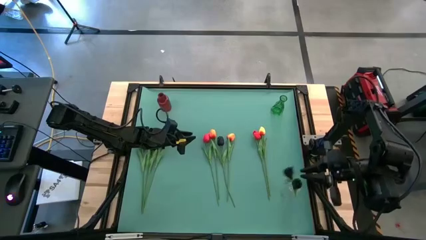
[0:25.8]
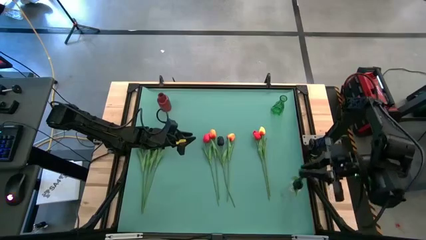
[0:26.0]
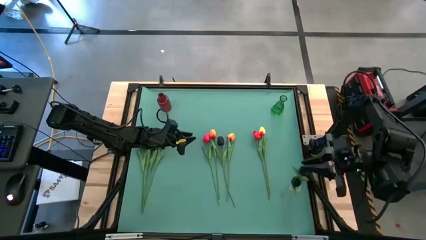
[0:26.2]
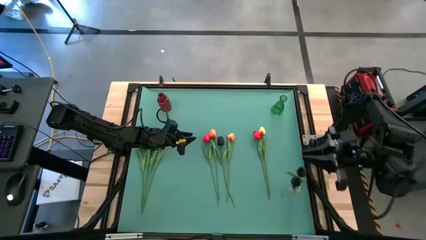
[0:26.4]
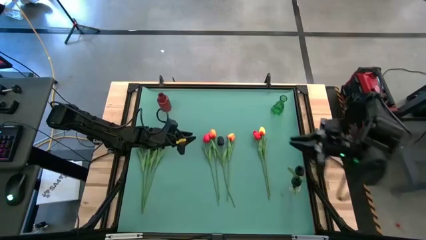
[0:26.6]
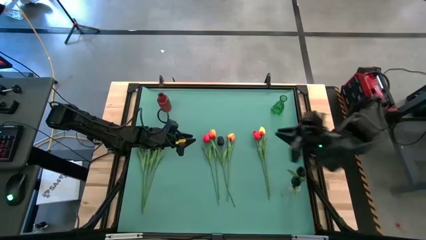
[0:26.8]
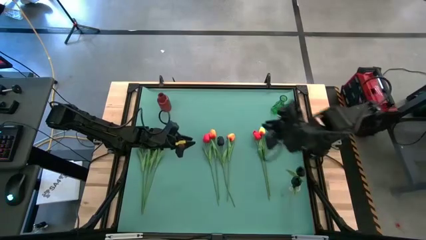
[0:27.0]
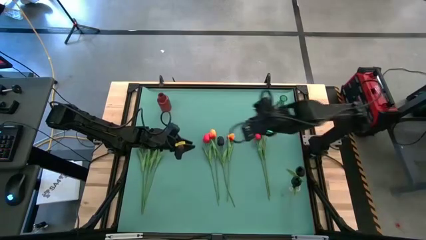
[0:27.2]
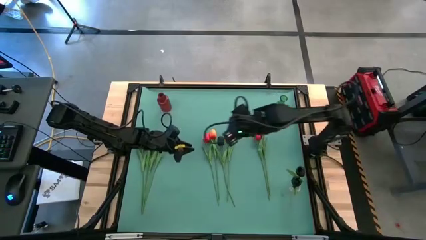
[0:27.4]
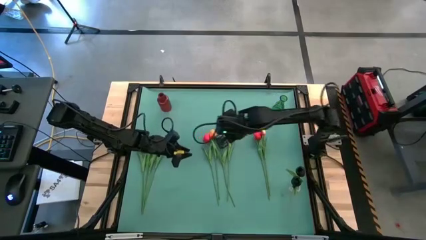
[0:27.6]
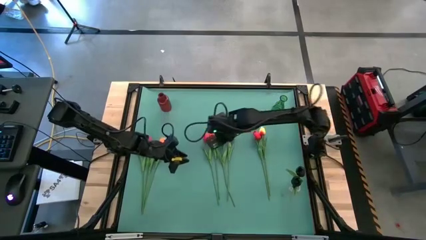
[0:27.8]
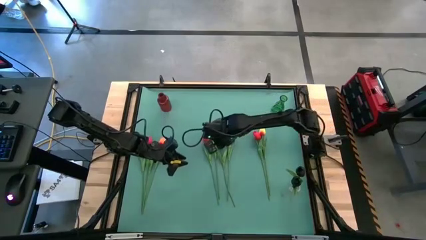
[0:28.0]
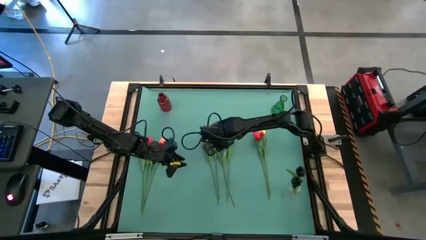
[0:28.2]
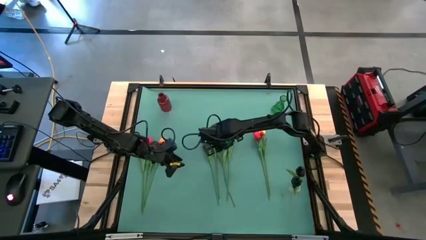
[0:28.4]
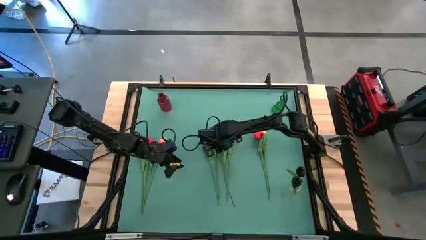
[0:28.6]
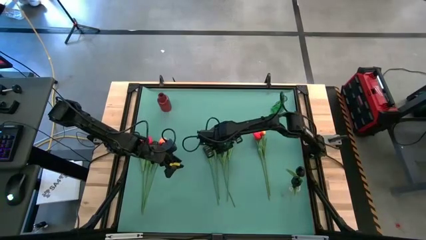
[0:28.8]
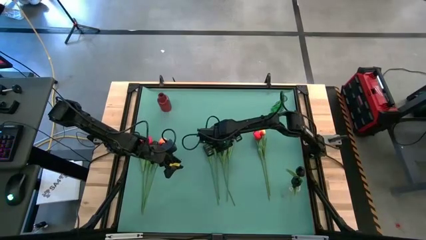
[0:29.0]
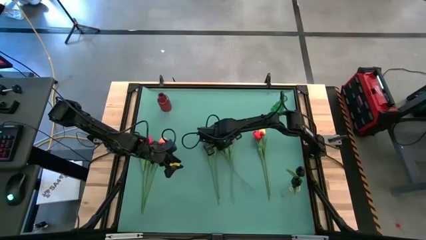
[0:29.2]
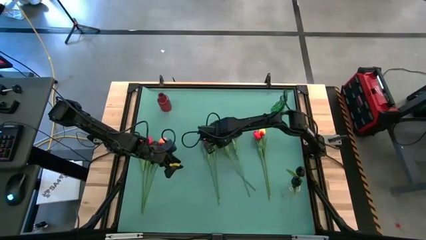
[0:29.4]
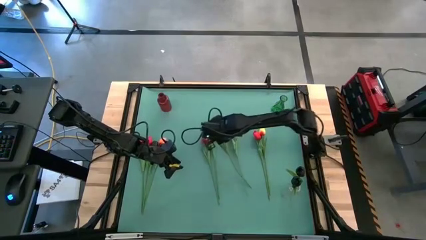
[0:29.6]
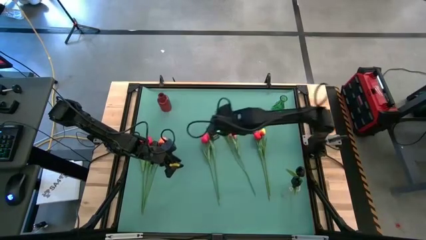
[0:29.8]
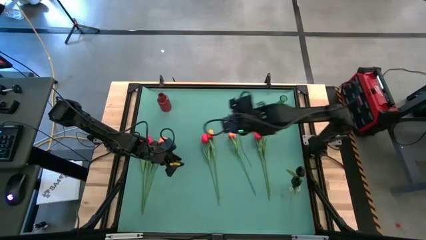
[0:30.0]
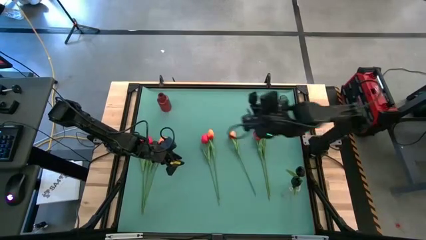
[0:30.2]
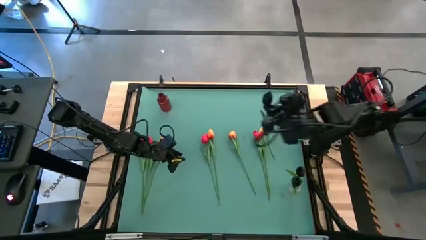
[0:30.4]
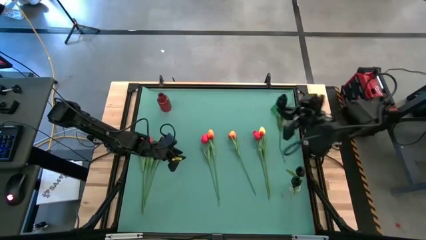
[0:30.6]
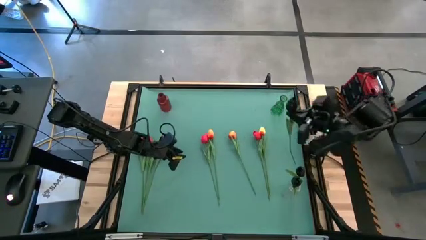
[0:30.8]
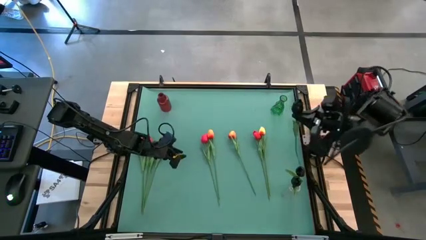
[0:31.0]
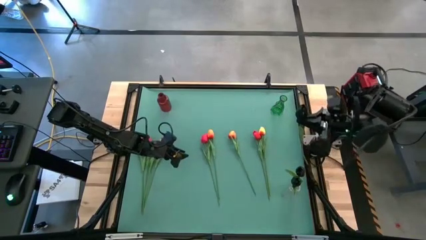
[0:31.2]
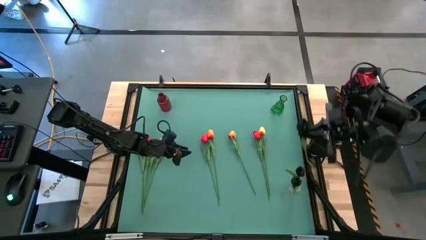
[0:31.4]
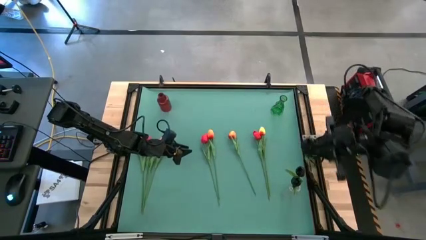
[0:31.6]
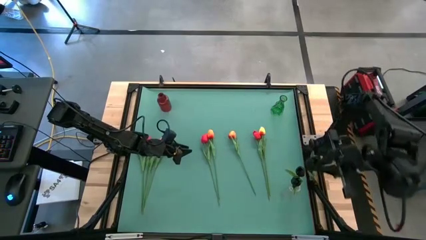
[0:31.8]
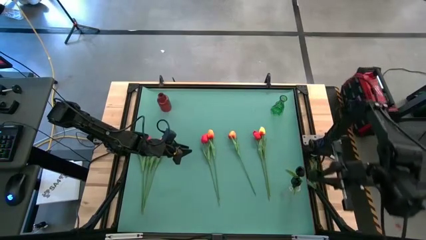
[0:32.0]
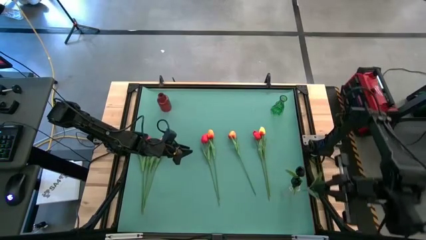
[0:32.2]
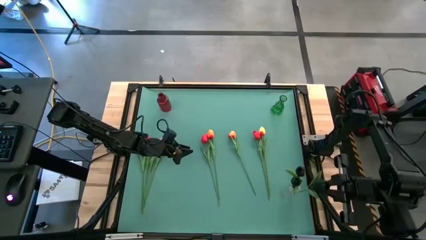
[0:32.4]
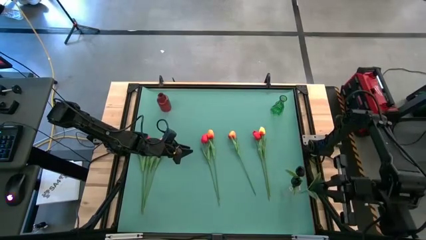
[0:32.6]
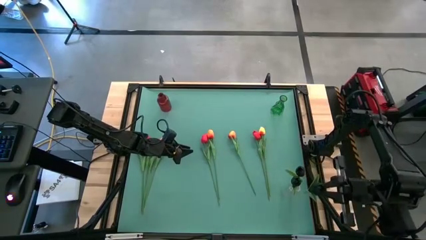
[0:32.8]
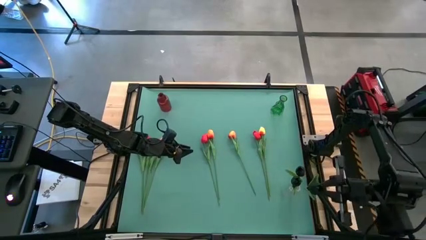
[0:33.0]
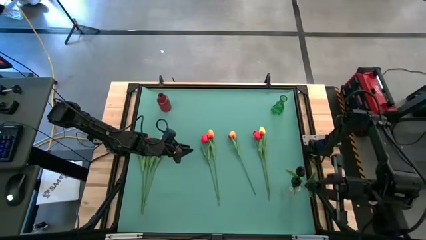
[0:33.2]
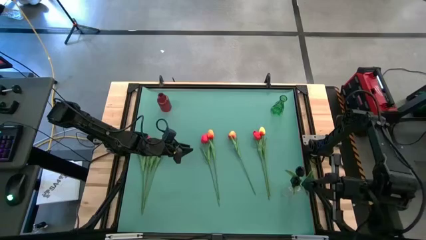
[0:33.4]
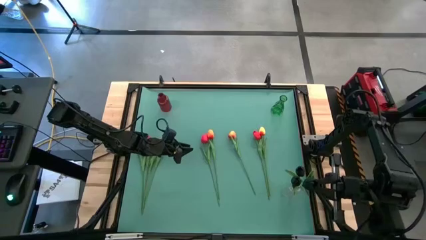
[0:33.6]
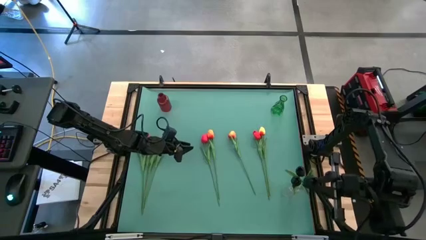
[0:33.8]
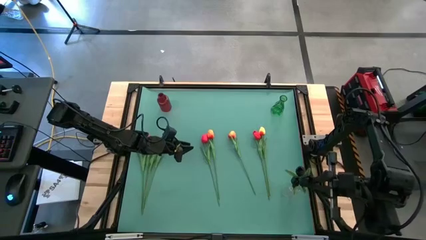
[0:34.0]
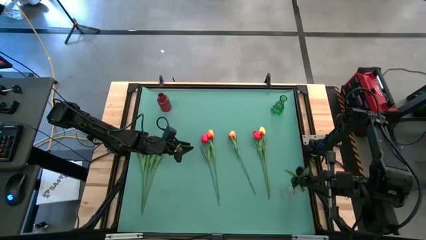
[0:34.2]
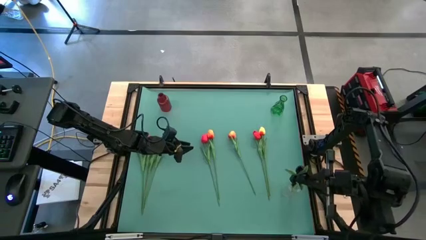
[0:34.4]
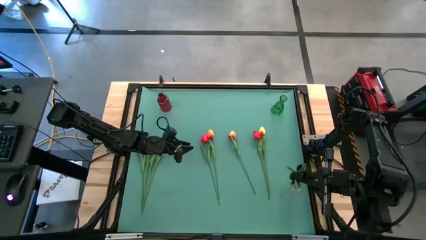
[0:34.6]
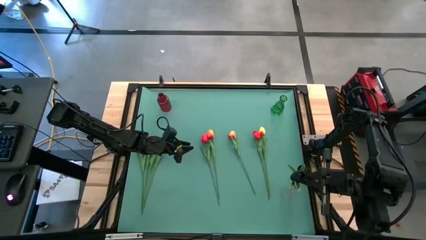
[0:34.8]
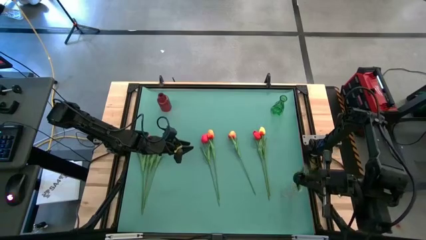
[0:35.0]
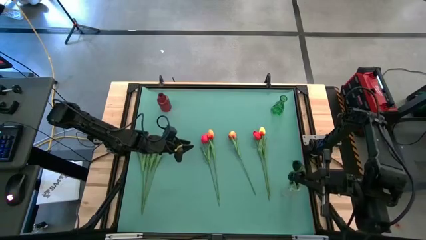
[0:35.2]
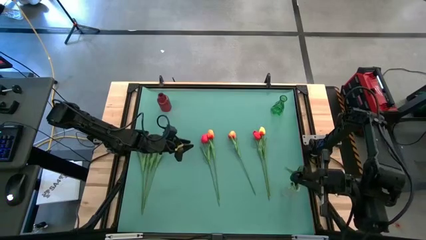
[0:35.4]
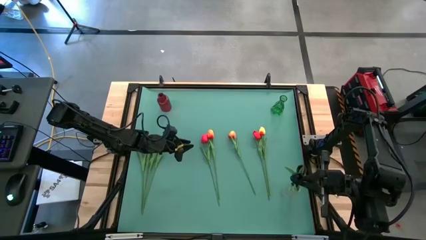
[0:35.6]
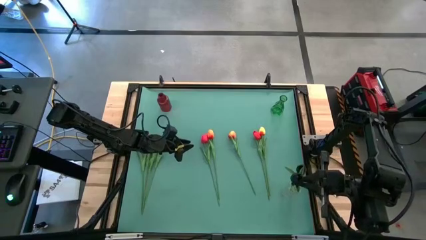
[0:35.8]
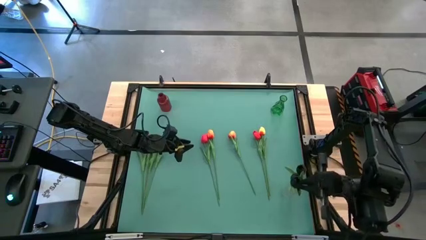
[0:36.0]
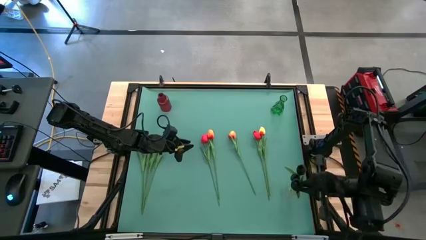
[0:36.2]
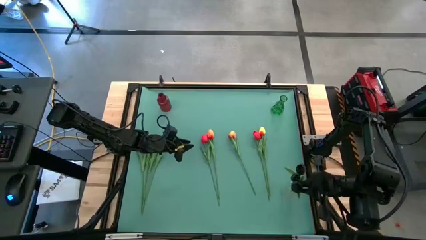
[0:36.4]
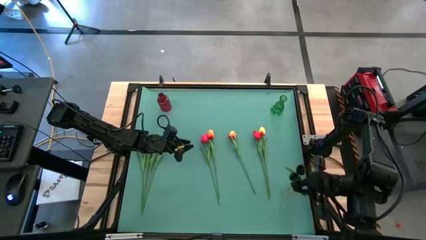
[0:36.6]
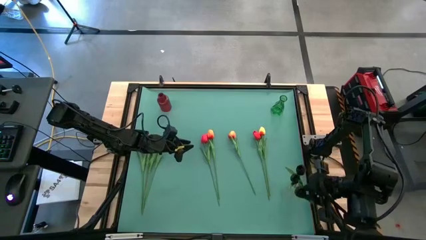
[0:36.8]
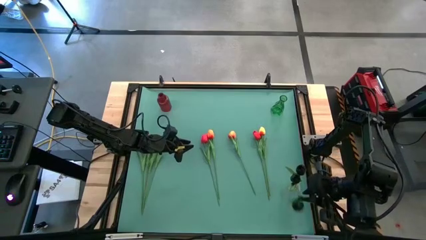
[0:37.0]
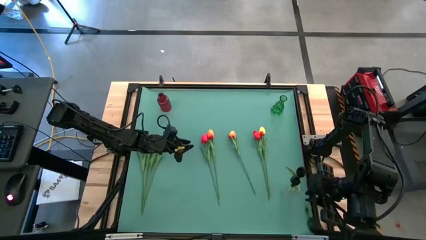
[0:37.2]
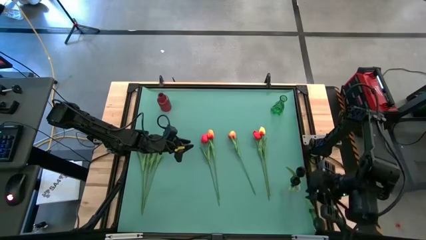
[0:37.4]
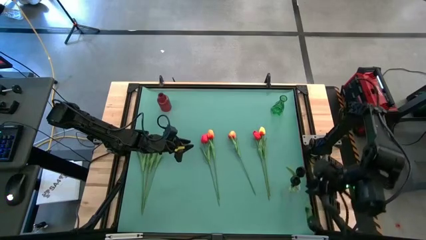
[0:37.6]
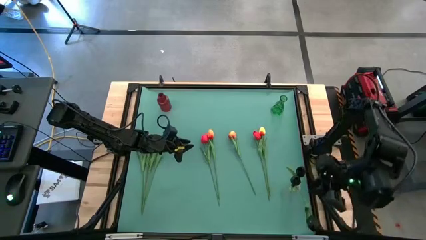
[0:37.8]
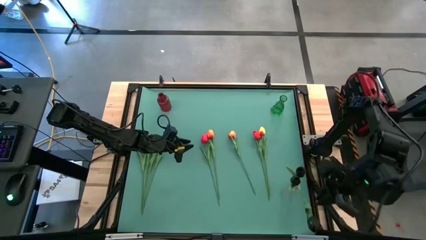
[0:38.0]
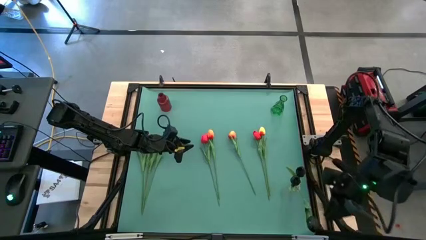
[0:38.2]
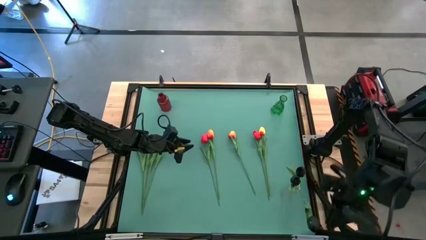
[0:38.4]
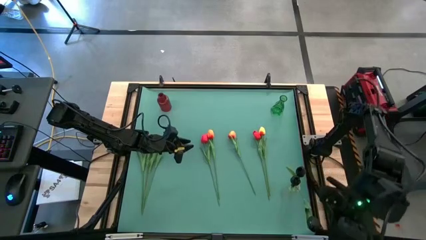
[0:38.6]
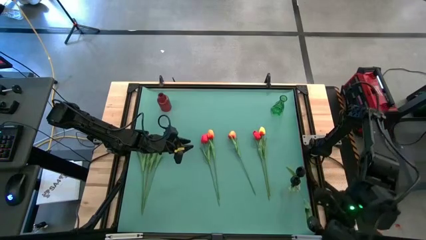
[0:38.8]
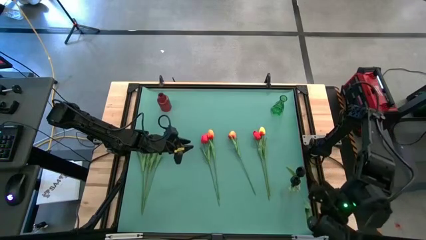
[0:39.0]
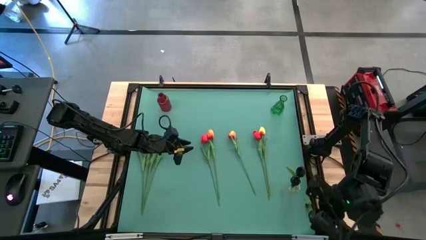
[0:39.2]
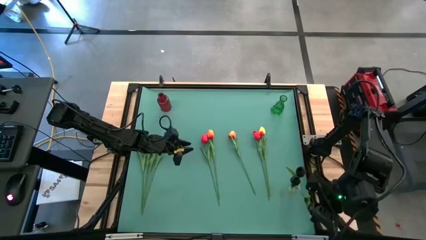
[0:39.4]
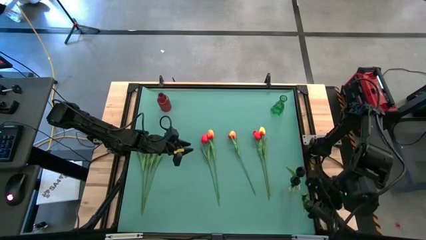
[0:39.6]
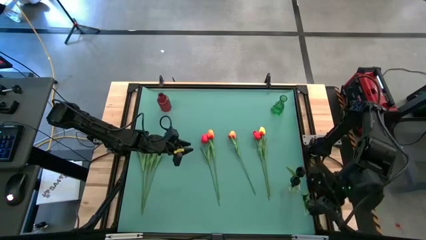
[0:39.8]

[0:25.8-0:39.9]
Task: Sort flowers into vase by color
Put the right black tulip into the transparent flower vase
